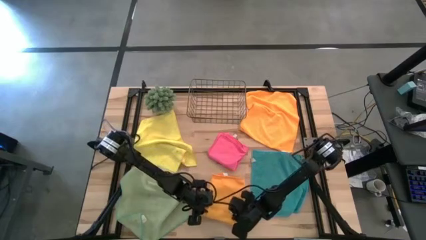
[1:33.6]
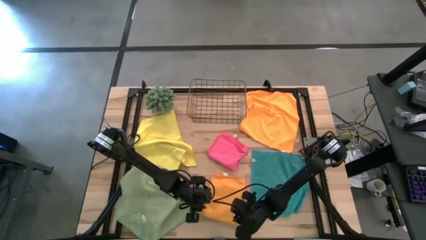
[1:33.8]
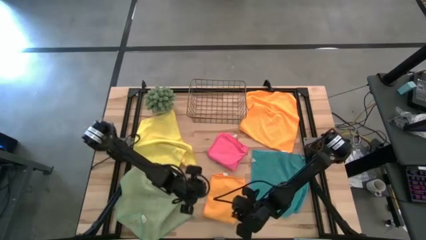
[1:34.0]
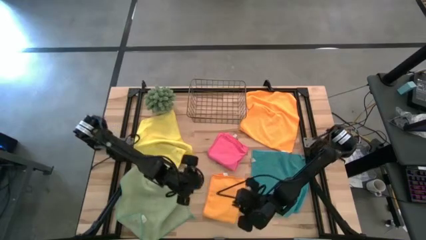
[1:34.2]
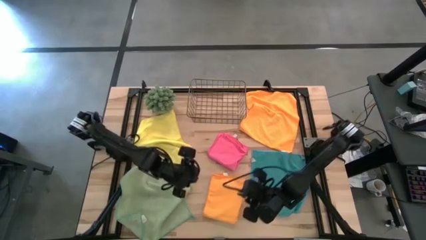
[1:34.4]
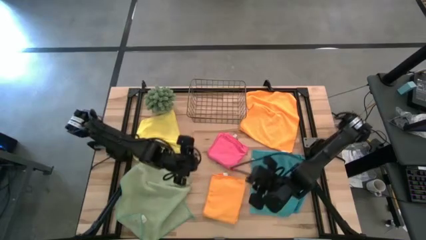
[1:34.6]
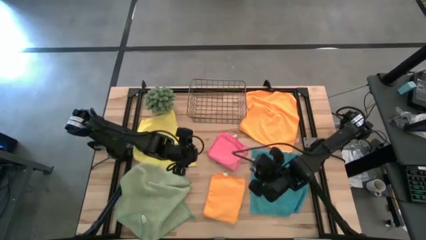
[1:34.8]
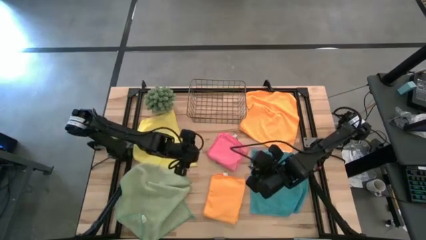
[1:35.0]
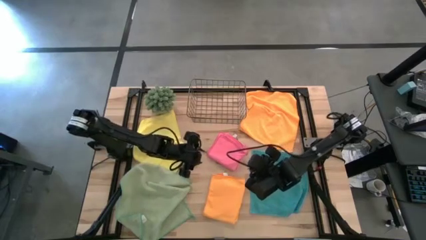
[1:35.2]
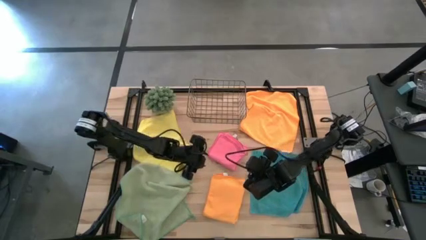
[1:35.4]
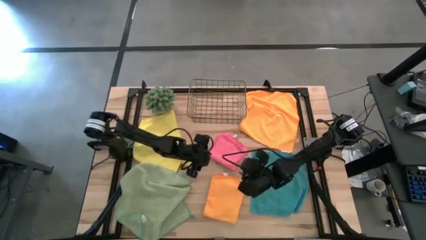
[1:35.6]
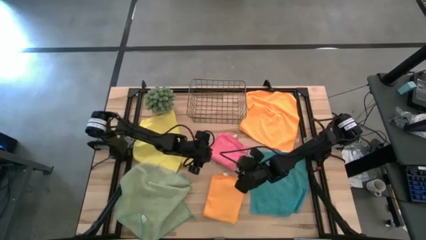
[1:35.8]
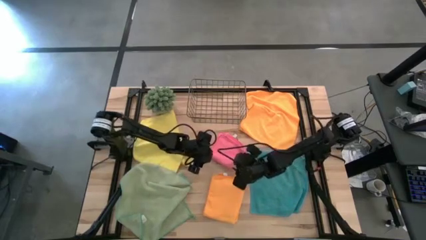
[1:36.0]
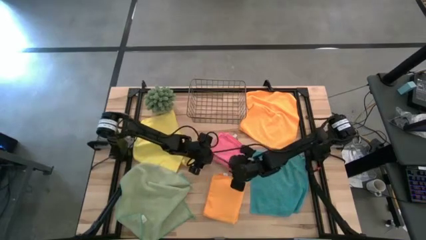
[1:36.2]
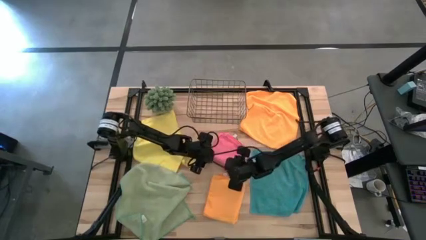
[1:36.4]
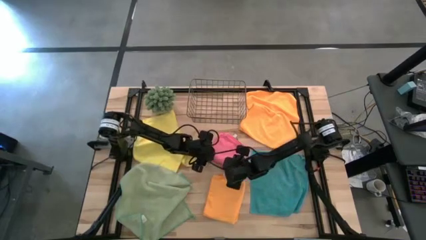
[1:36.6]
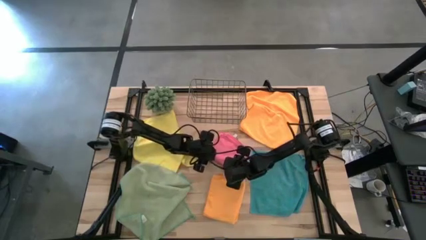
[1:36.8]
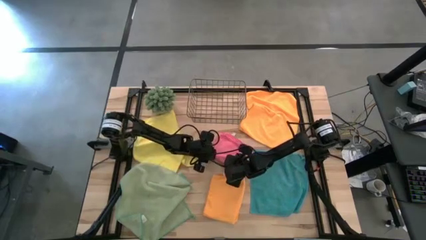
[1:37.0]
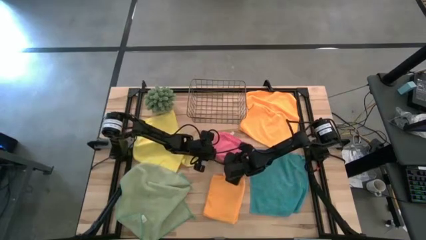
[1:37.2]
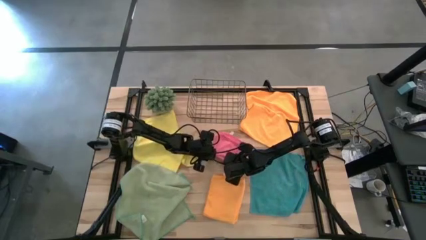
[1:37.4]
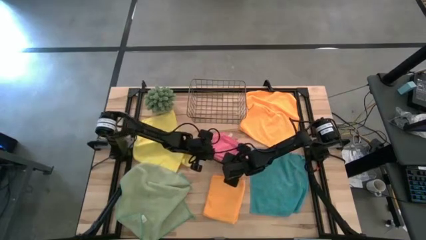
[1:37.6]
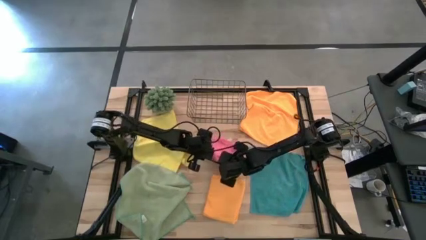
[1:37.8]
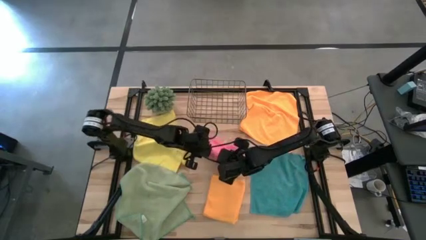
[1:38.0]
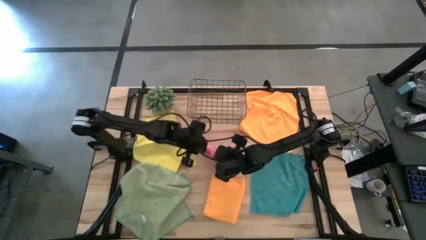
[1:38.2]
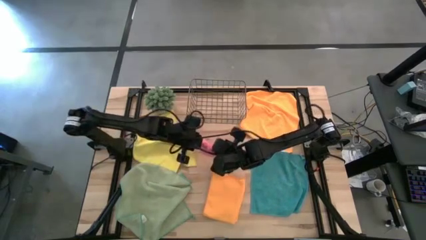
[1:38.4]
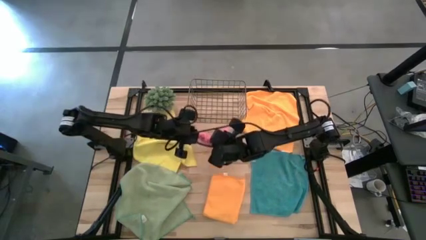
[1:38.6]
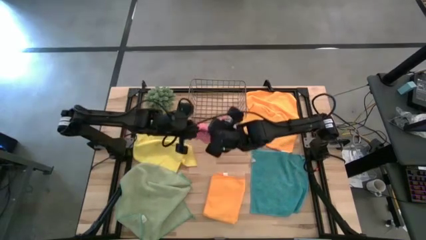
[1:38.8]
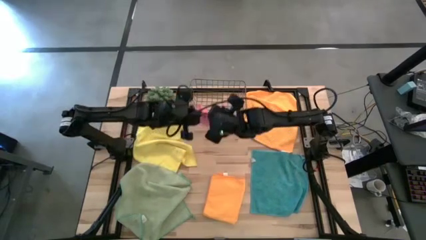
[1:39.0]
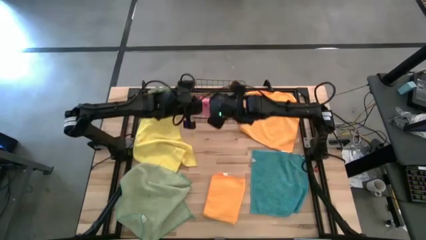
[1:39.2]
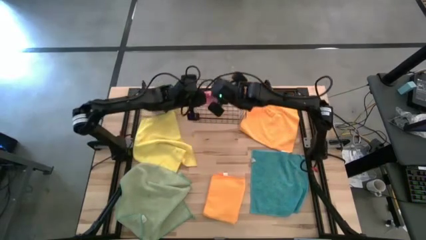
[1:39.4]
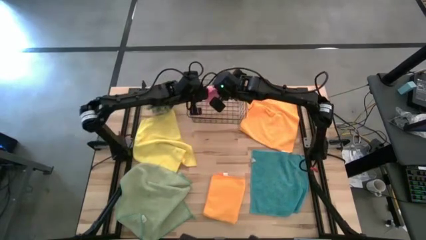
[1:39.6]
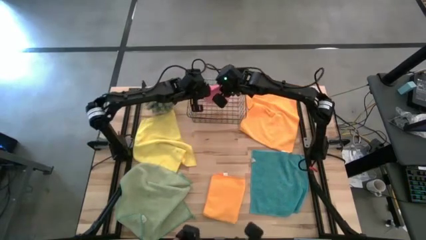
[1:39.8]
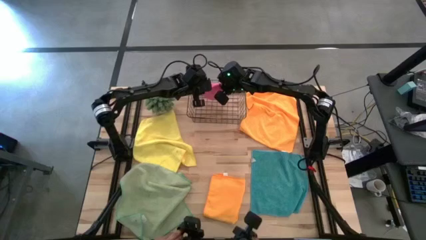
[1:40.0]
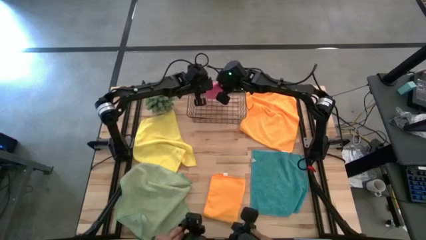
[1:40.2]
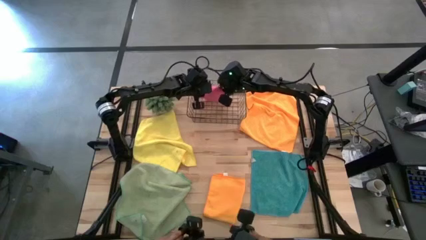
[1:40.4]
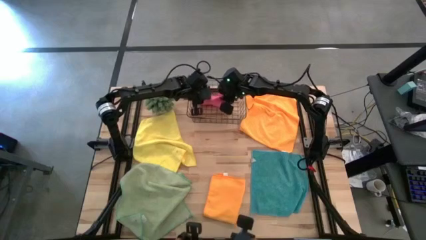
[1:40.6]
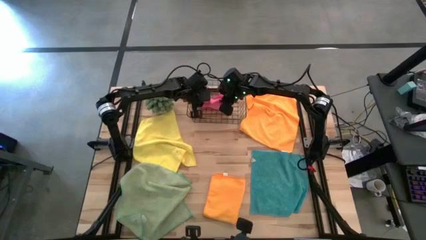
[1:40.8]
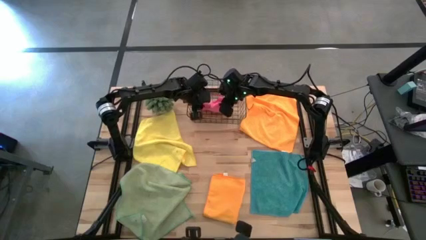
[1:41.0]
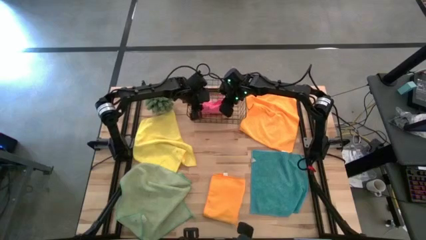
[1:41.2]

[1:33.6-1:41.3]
Task: Fold microfiber towels
Put the folded pink microfiber towel into the wire basket

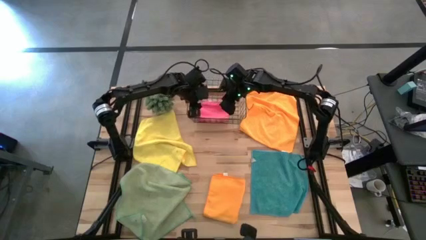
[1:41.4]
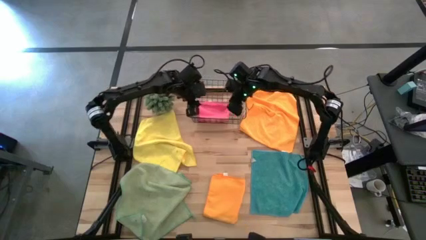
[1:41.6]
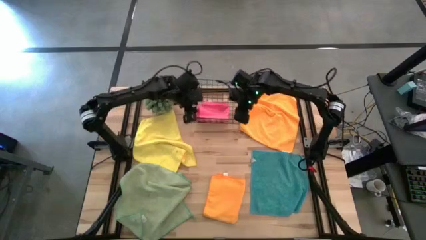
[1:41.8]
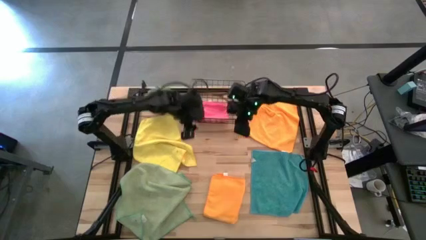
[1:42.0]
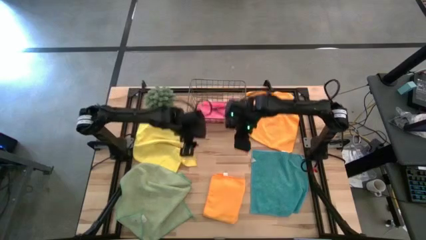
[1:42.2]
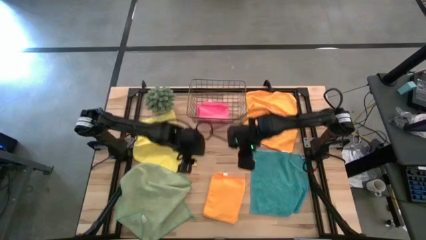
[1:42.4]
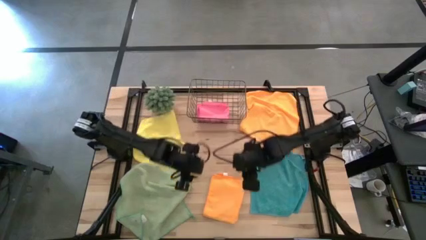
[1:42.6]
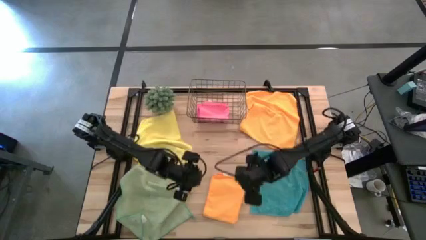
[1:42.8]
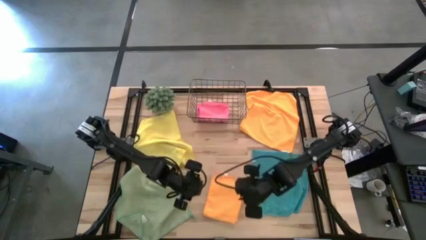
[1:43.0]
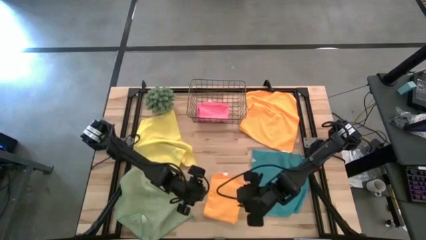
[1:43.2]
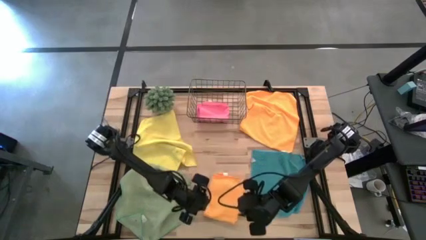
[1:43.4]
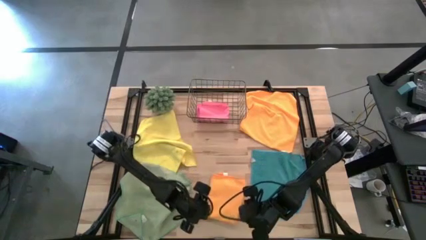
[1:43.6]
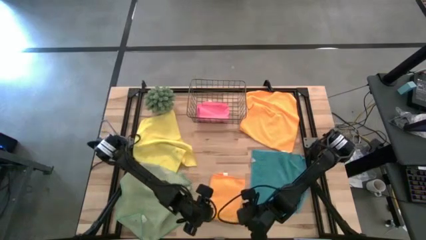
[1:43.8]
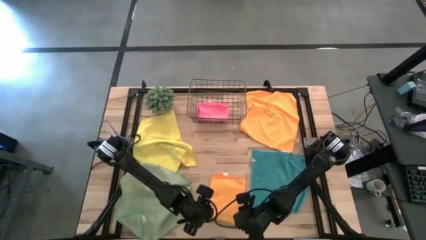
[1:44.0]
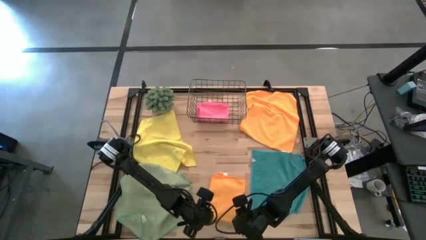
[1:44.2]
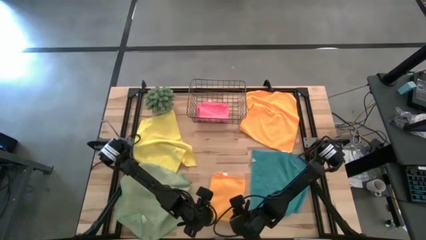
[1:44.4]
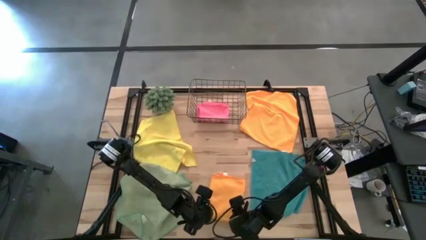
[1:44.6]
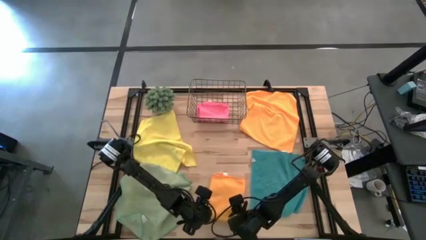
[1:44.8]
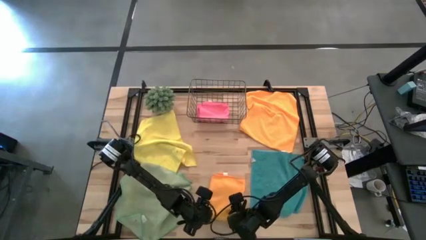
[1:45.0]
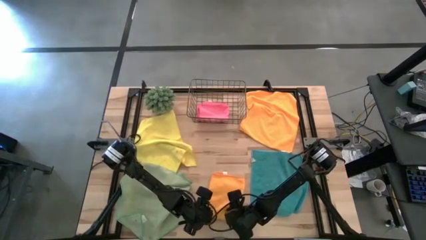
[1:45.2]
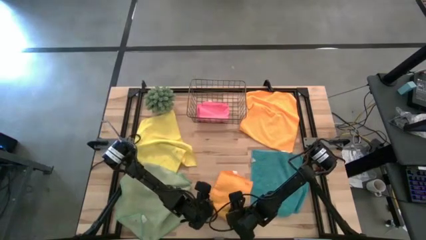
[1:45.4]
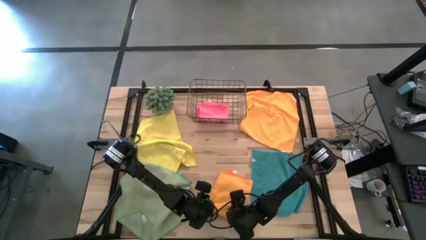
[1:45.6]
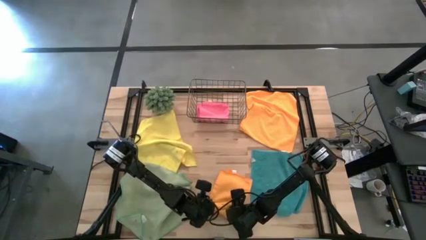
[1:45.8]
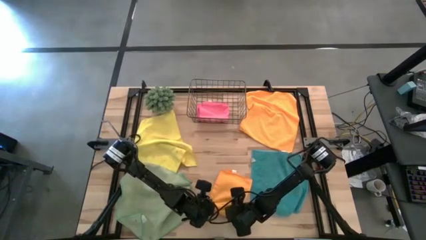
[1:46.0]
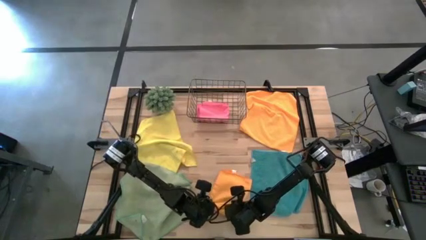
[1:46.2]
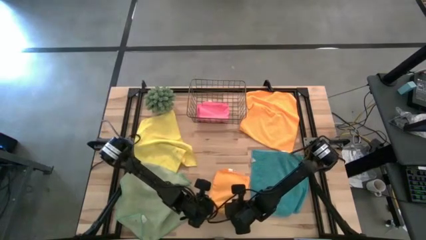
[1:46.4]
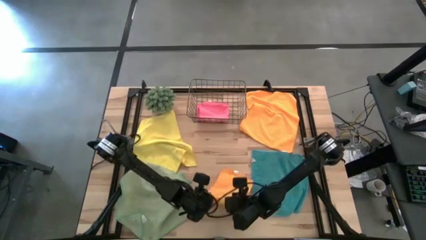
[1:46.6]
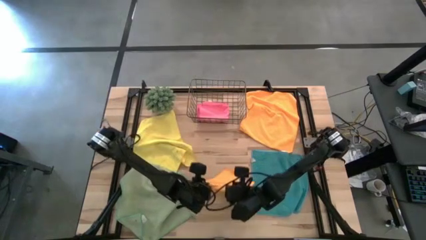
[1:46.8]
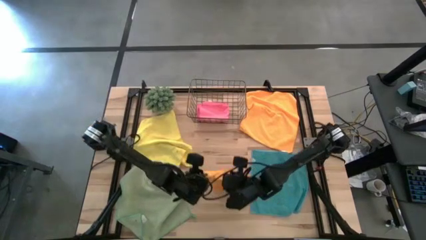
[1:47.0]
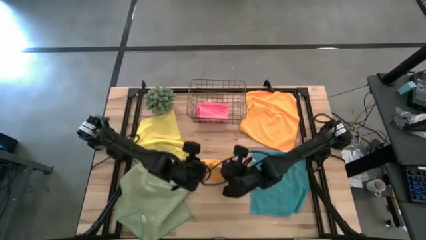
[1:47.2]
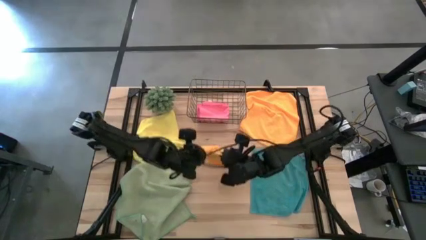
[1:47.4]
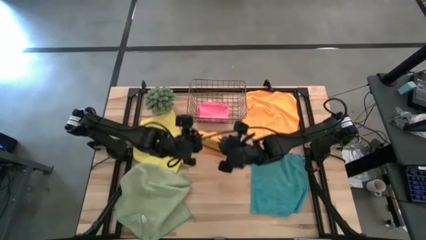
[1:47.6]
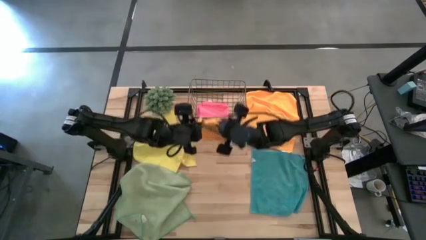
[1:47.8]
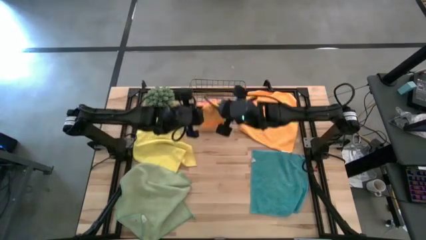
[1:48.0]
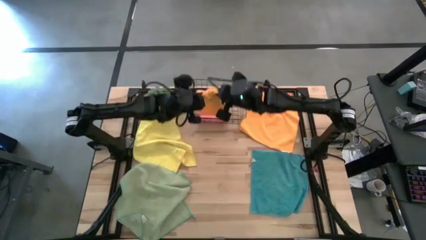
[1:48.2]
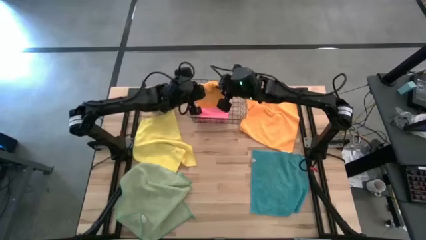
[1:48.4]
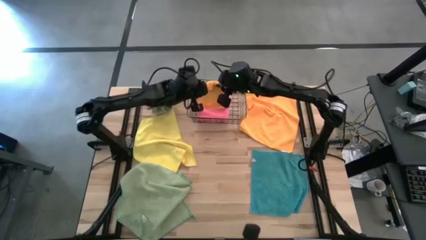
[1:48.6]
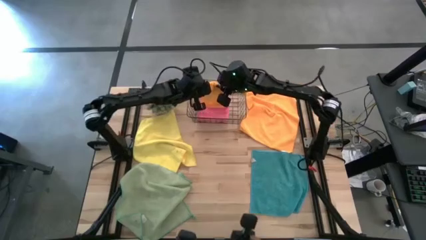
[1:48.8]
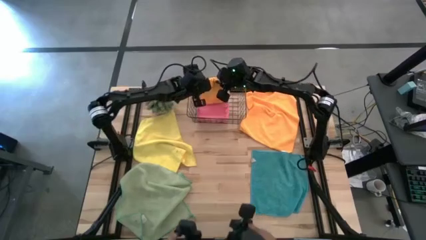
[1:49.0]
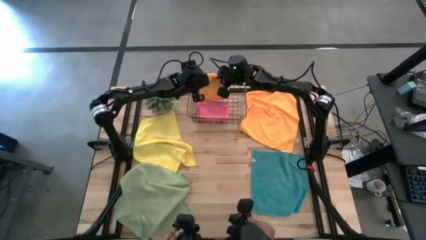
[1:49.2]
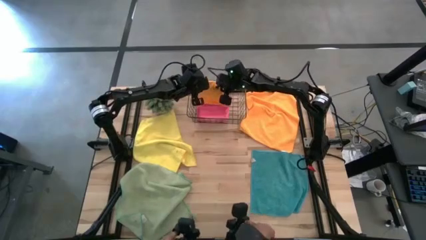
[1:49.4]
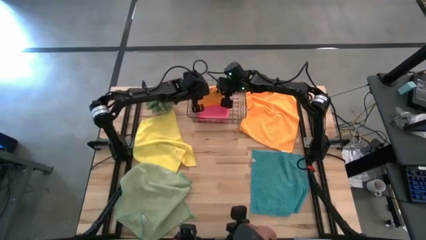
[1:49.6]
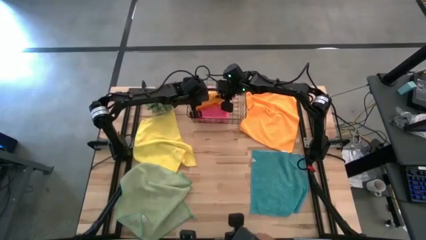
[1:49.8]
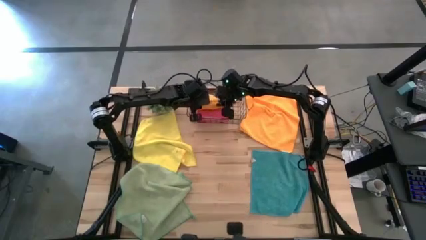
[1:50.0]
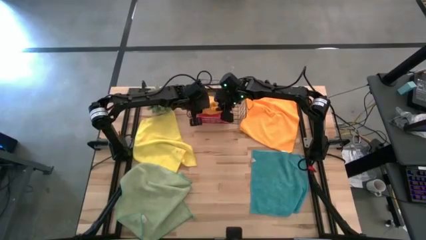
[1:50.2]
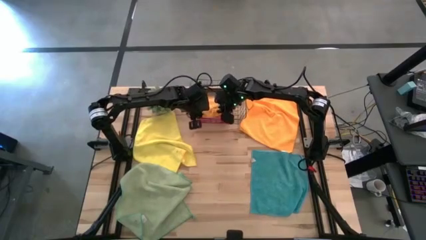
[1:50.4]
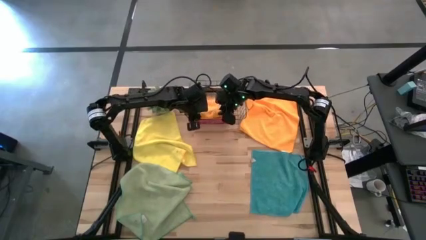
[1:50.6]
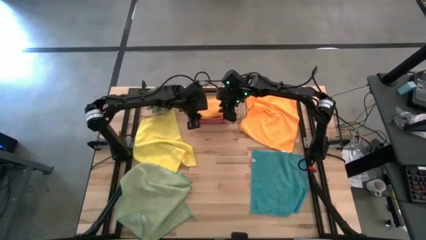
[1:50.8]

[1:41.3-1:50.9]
Put the folded orange microfiber towel into the wire basket
